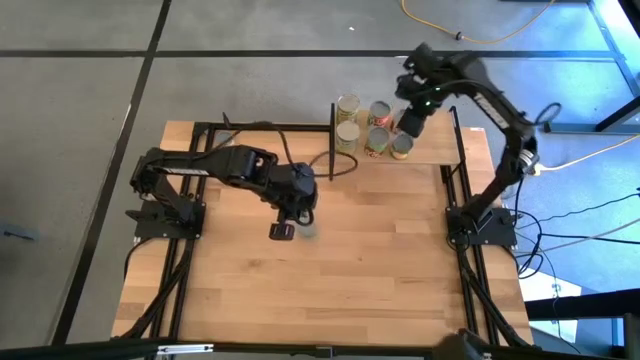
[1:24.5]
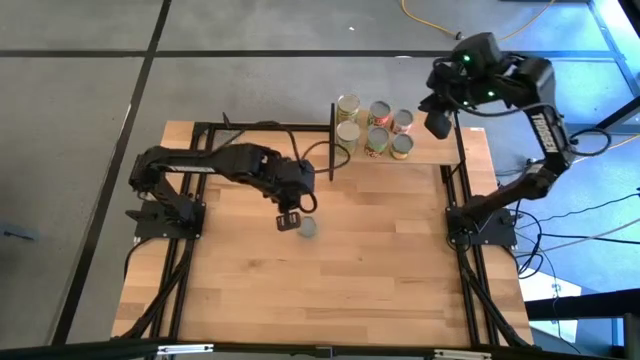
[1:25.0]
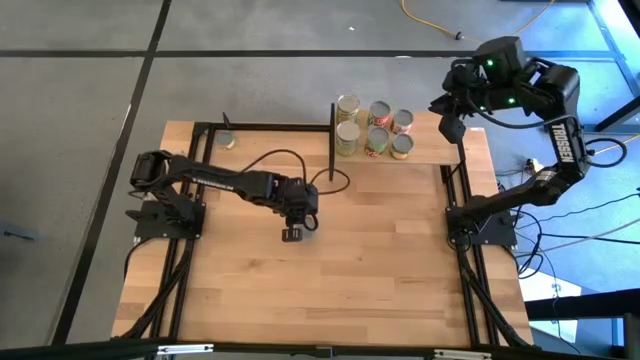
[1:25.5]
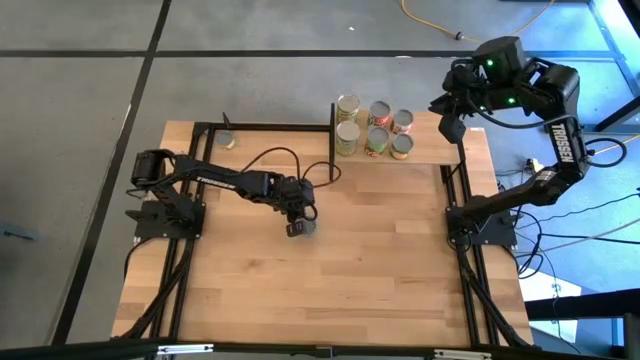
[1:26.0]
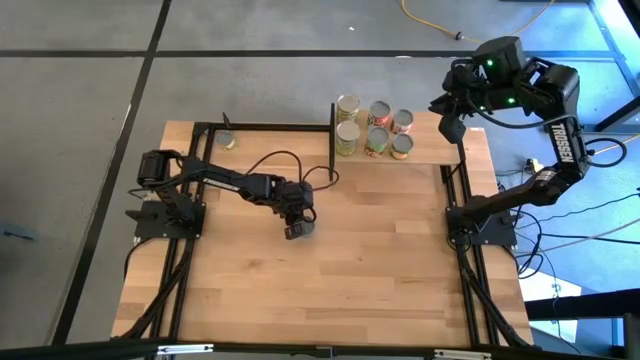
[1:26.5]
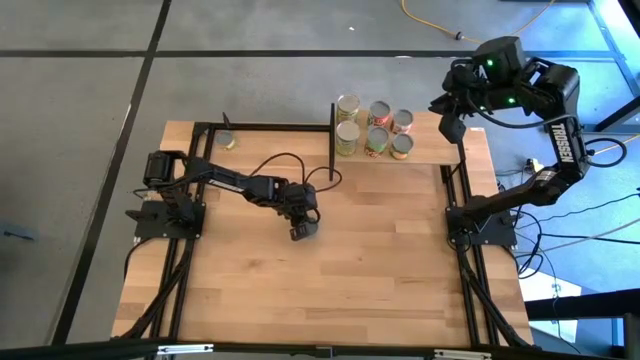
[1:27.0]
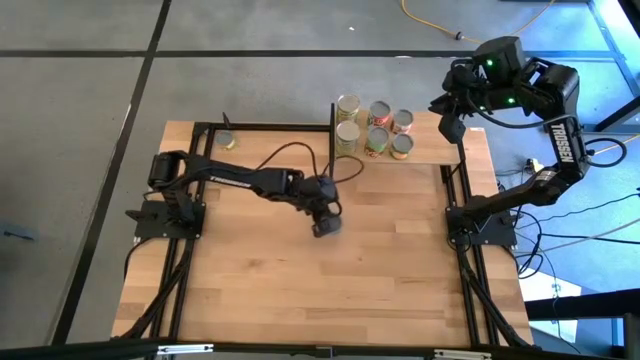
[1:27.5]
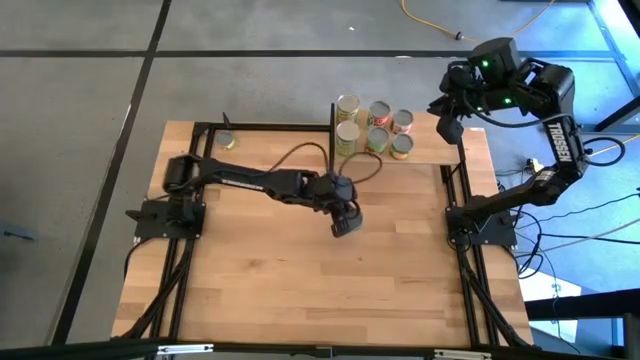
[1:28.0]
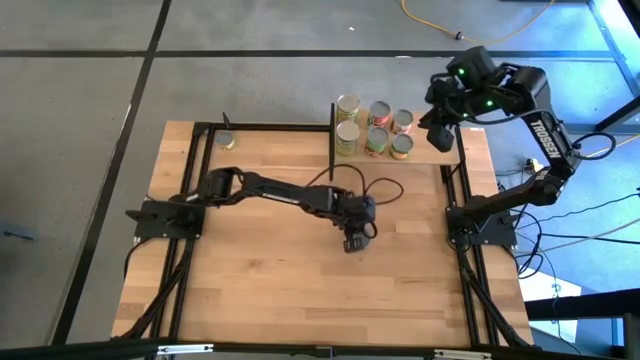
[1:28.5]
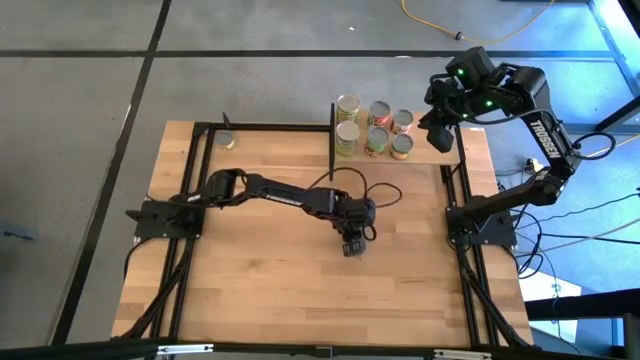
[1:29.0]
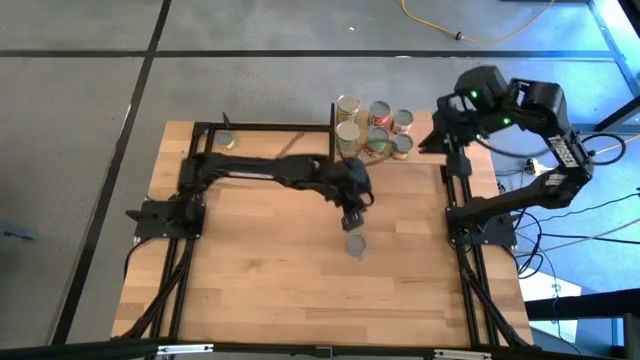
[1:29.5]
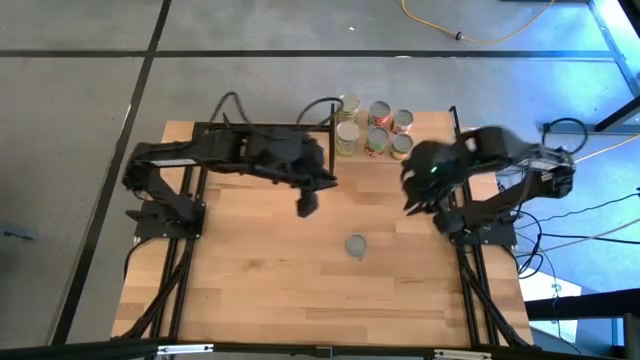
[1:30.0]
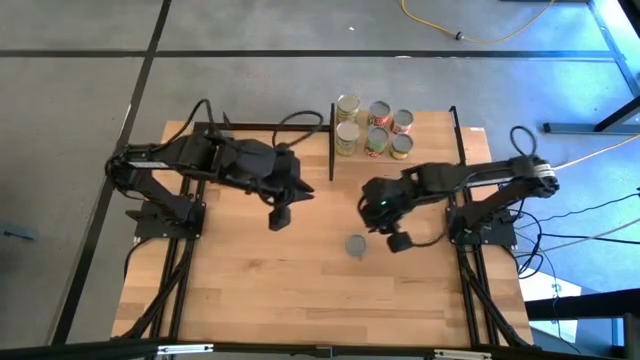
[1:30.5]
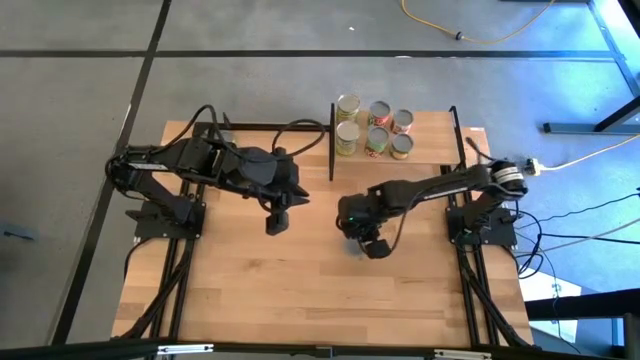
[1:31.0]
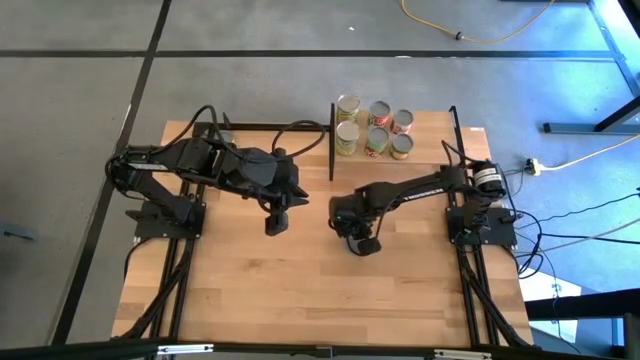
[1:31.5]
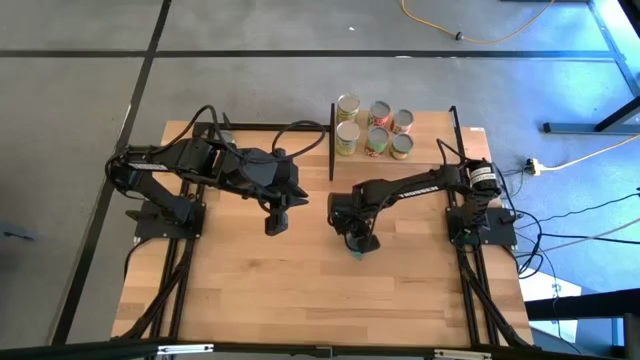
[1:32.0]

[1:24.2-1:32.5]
Task: Pick and place cans onto a shelf
Put the blue can on the shelf

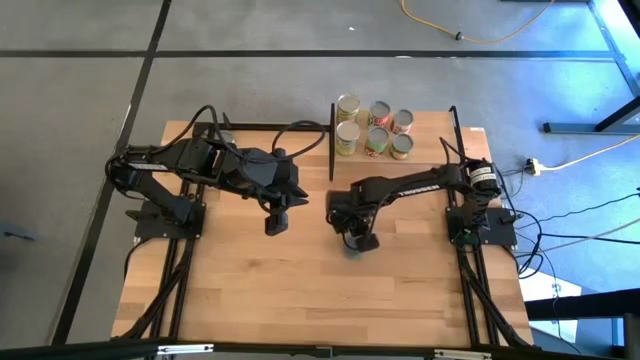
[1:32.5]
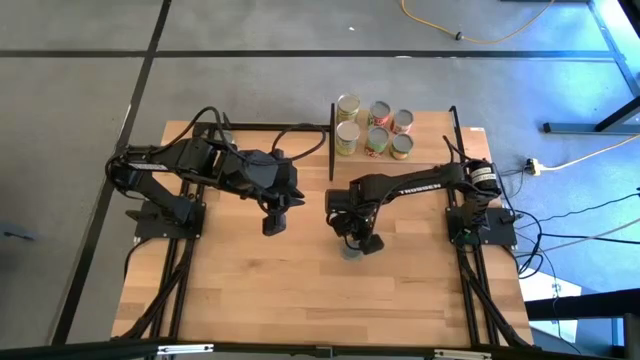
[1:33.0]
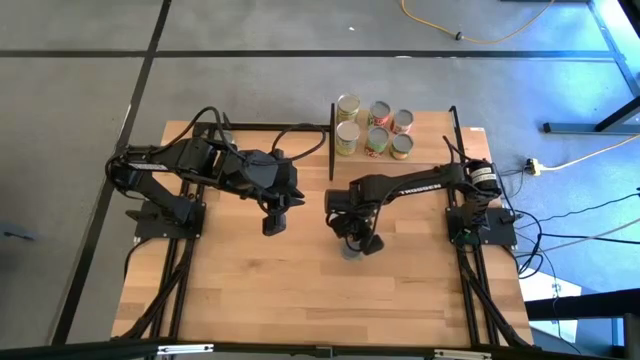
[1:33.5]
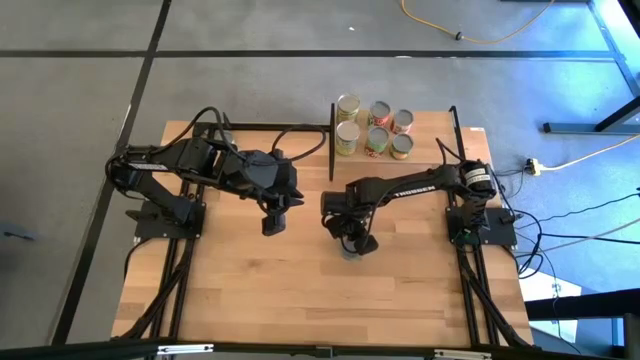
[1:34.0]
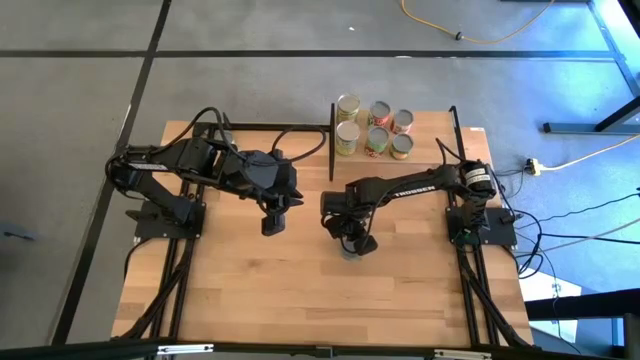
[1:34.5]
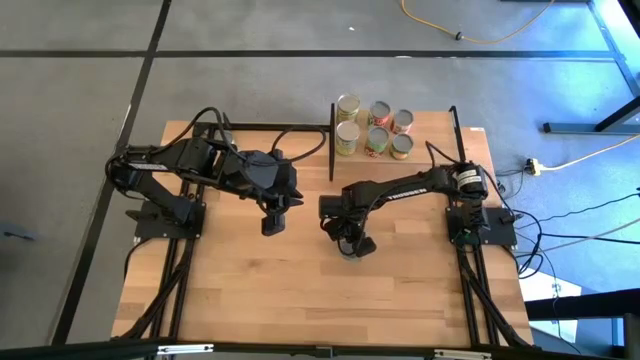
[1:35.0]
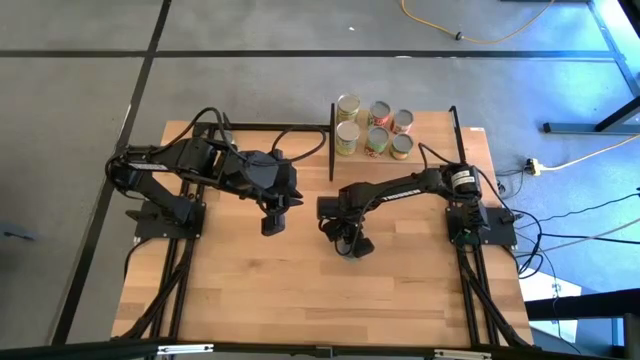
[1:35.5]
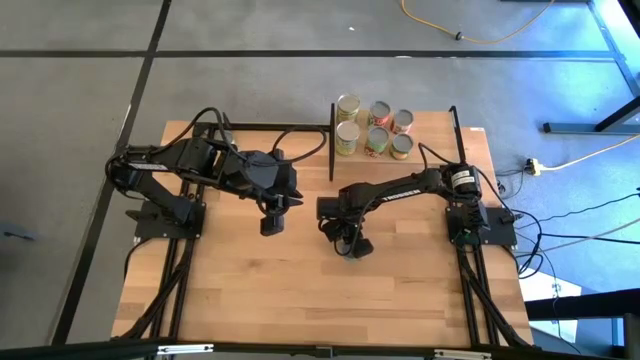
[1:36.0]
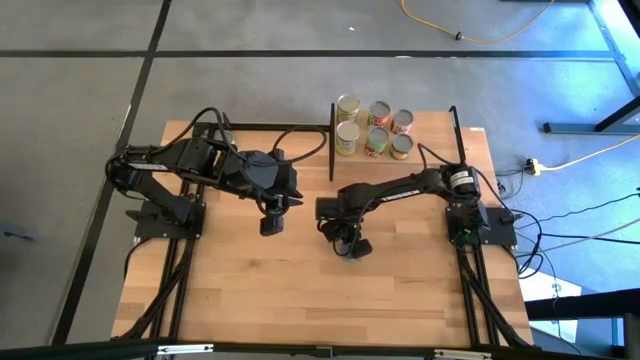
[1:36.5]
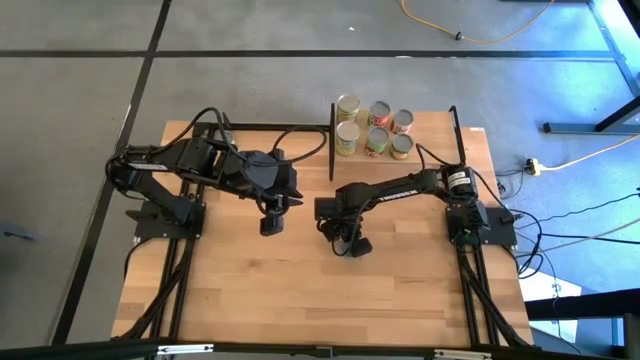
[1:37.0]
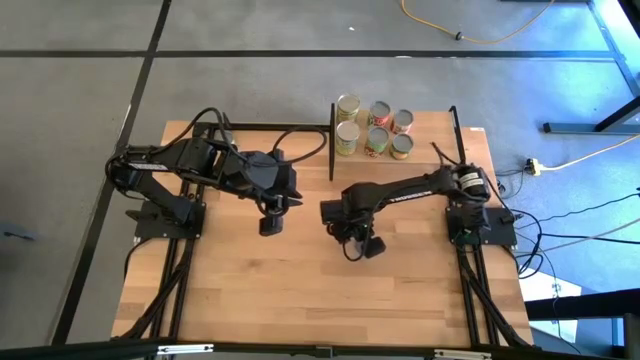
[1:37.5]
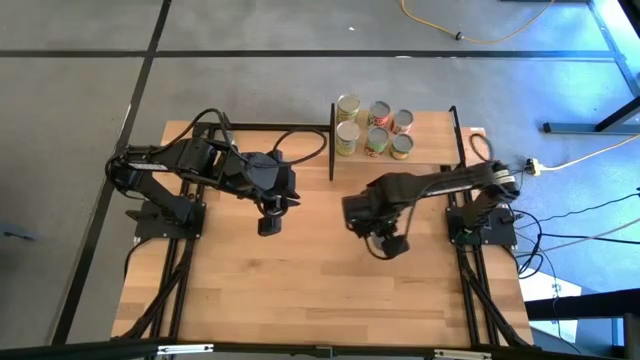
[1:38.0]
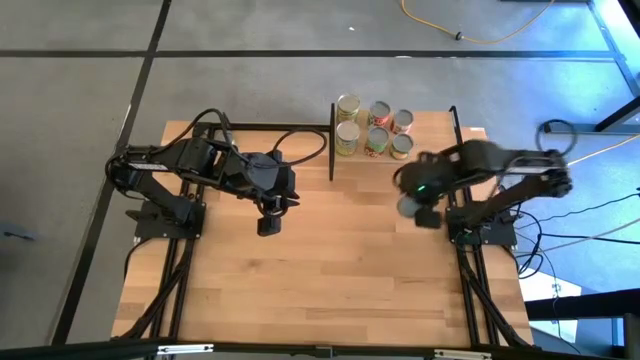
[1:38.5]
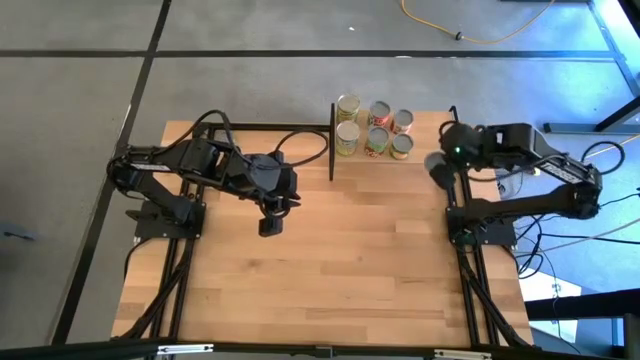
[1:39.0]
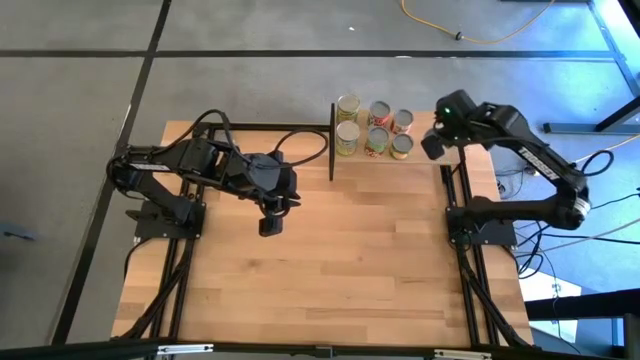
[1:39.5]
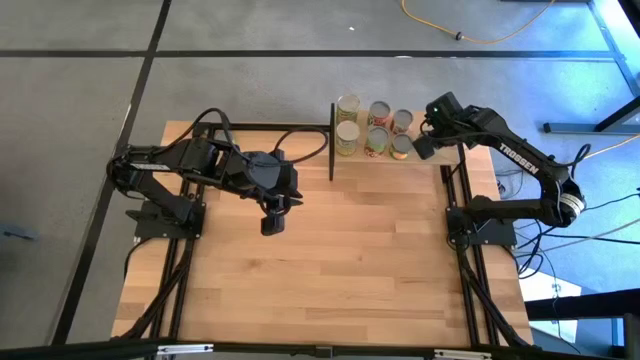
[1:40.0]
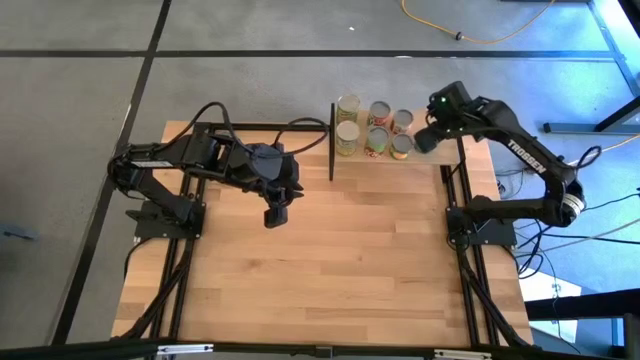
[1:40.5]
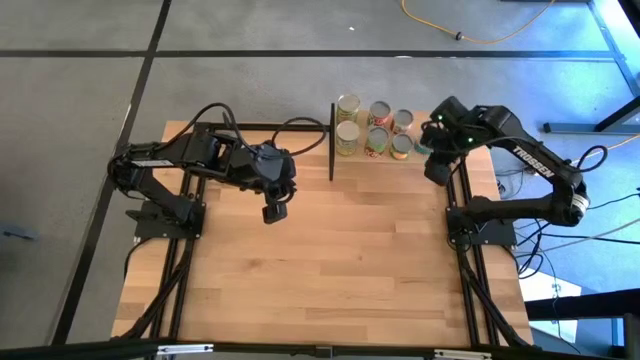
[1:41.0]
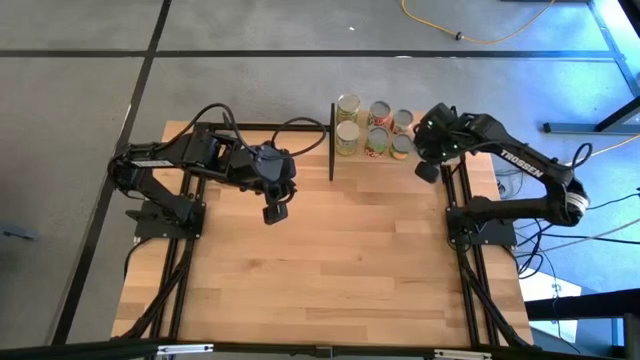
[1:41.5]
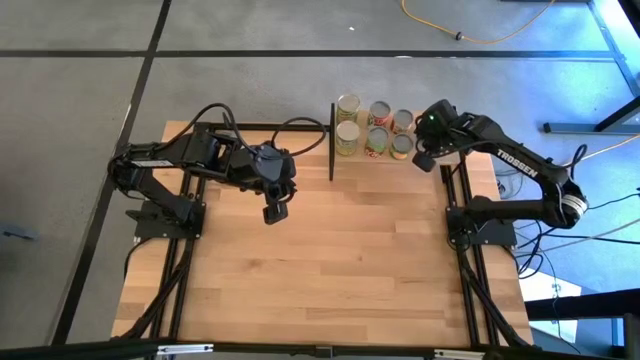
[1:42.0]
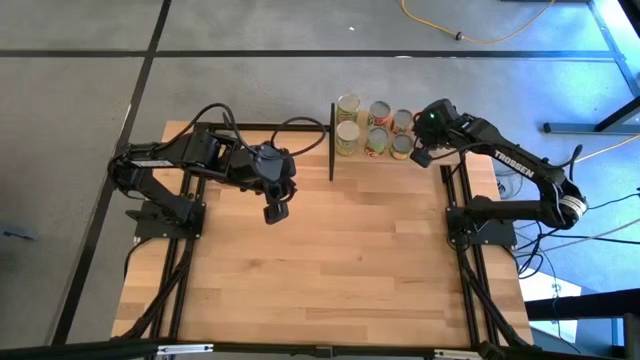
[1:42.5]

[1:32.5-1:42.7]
Put the blue can on the shelf

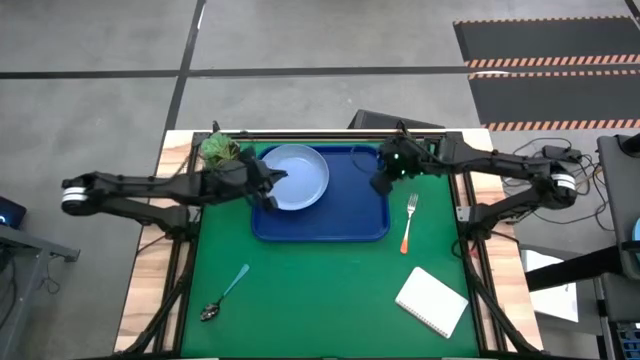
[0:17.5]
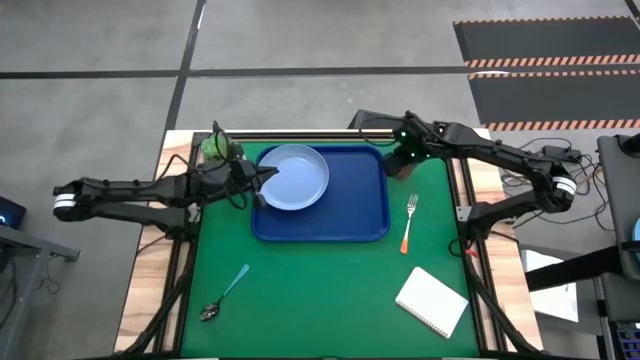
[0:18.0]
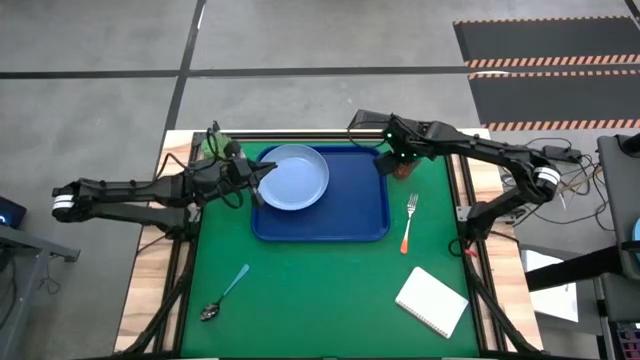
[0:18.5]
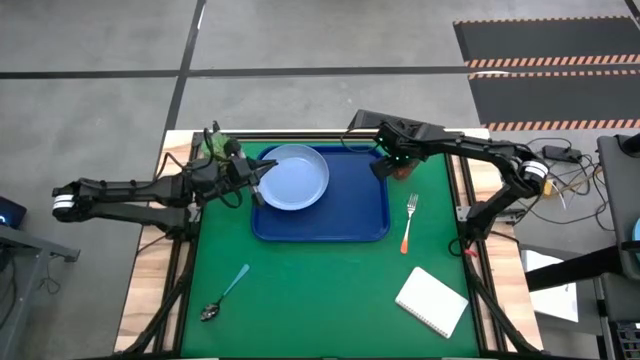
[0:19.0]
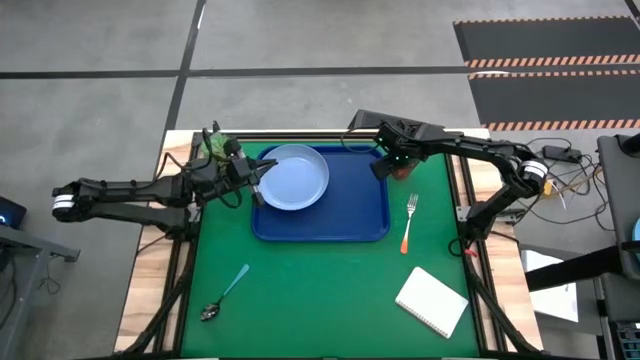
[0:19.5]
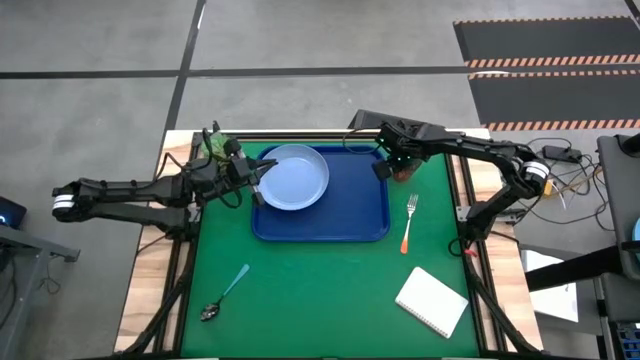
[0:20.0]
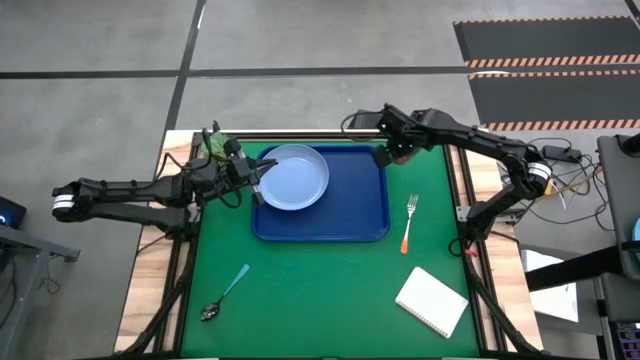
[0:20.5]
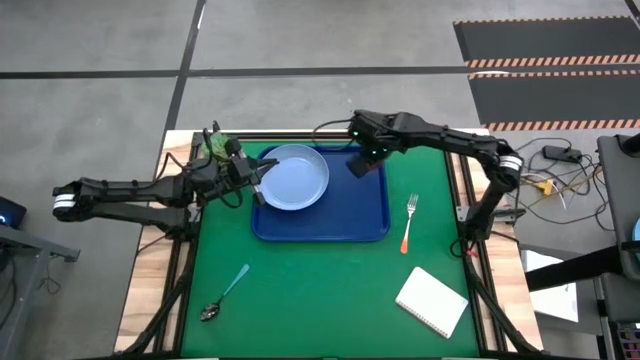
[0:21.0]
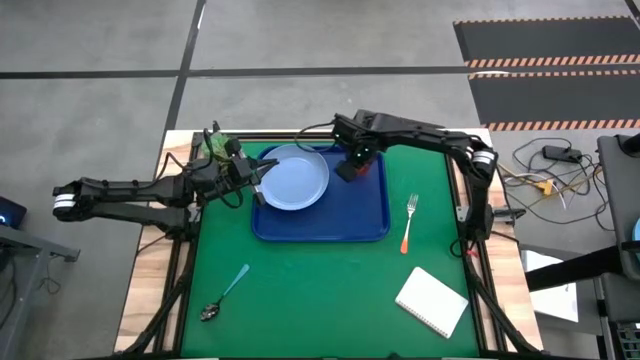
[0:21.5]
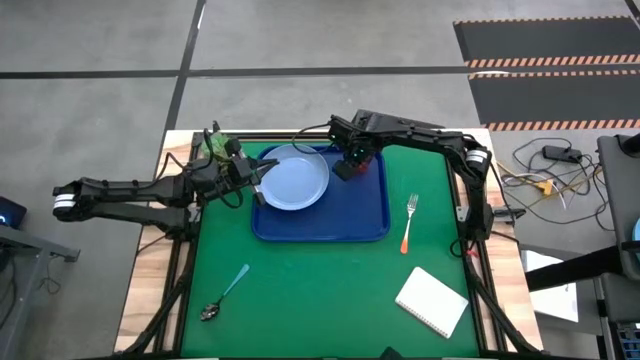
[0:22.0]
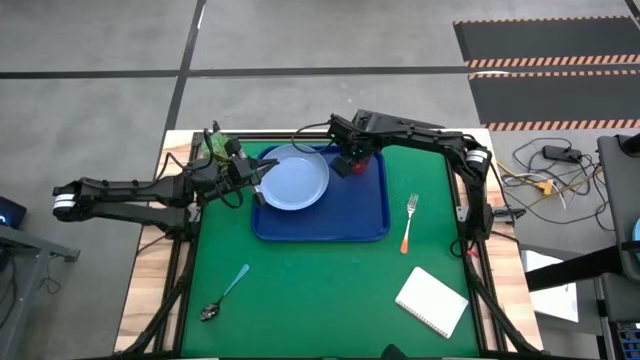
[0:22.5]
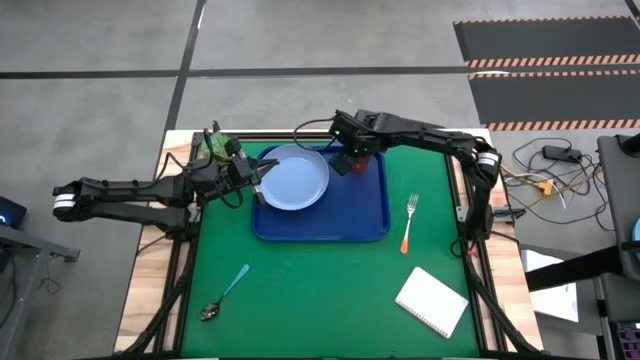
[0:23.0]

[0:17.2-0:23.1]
Task: Pick and place plate/cup/fork/spoon on tray
Put the orange glass on the blue serving tray
